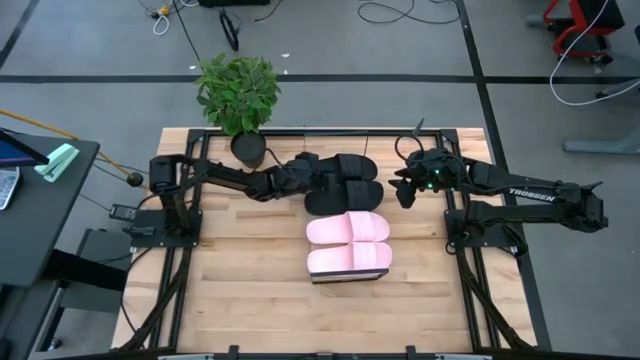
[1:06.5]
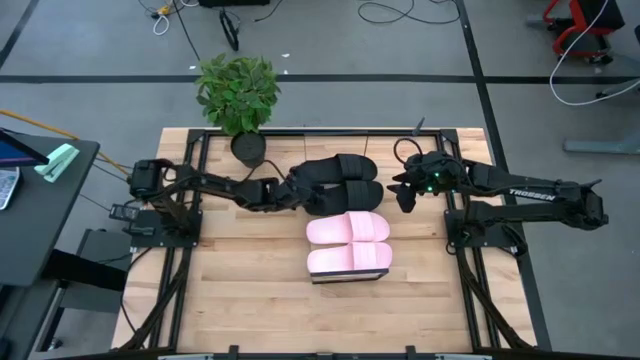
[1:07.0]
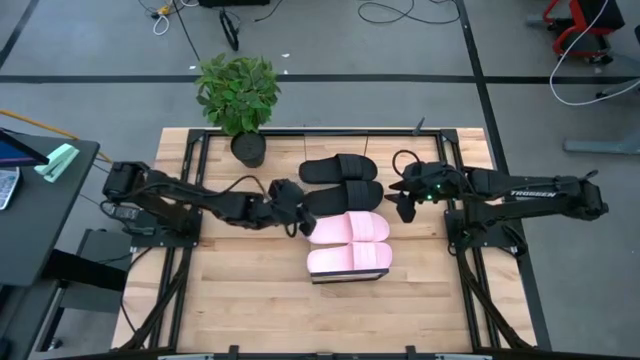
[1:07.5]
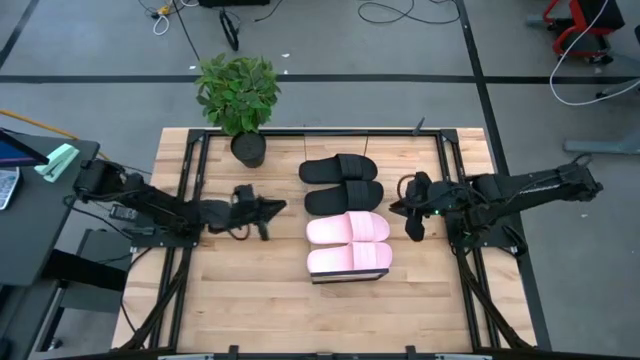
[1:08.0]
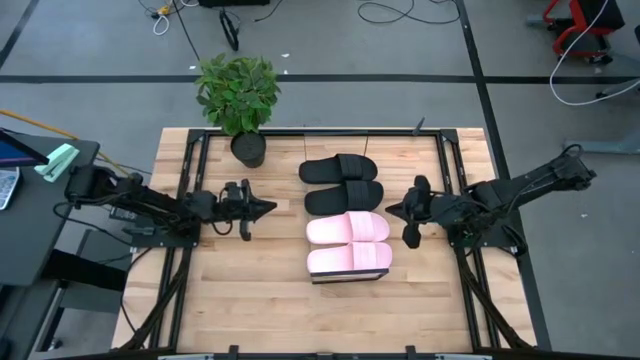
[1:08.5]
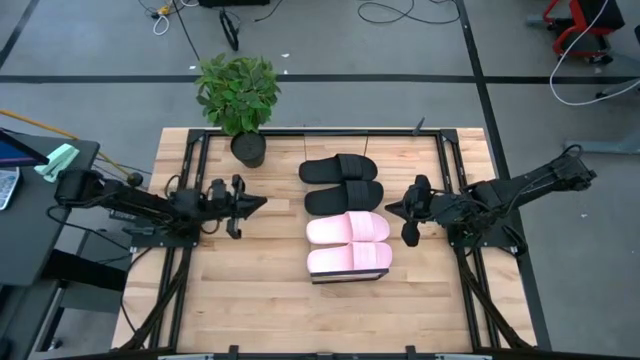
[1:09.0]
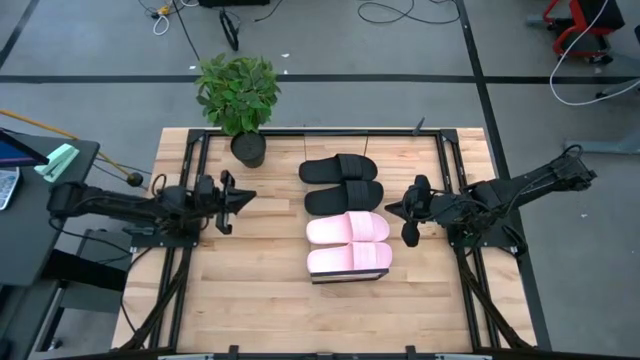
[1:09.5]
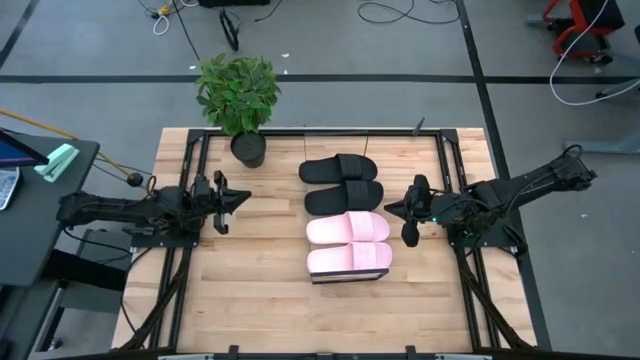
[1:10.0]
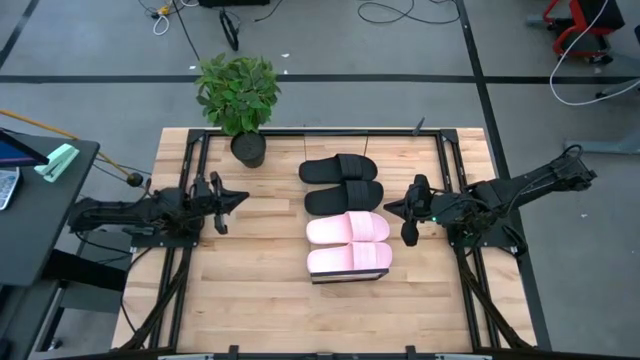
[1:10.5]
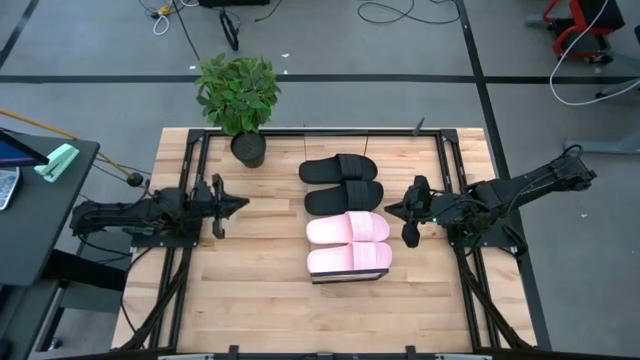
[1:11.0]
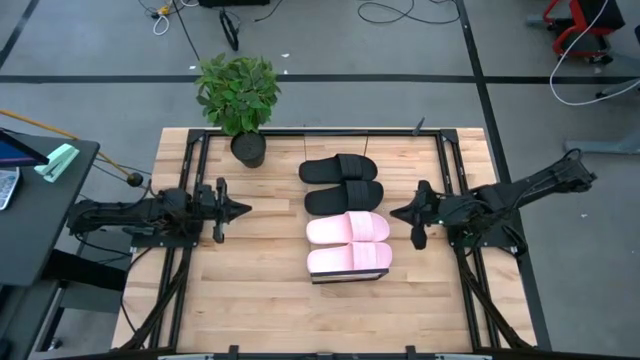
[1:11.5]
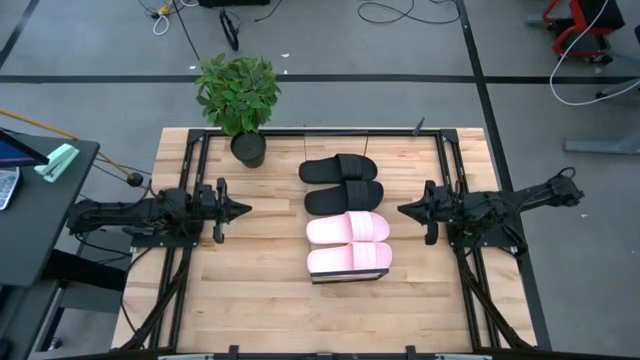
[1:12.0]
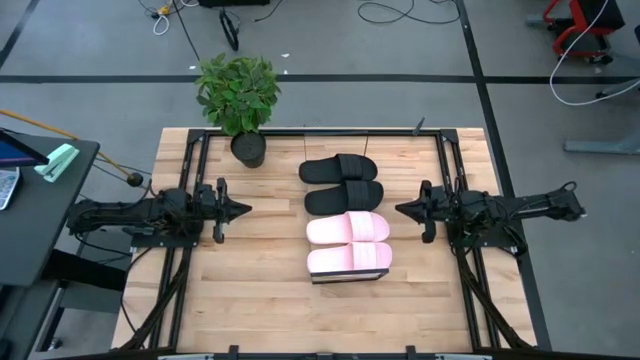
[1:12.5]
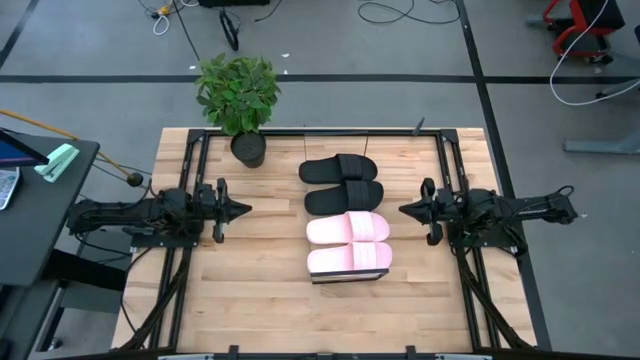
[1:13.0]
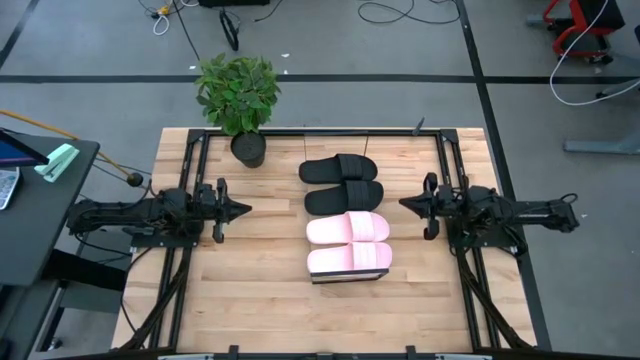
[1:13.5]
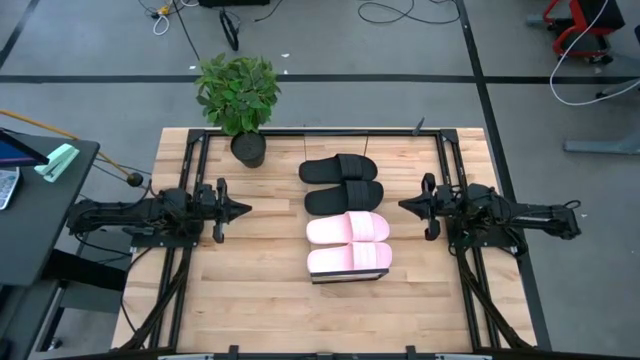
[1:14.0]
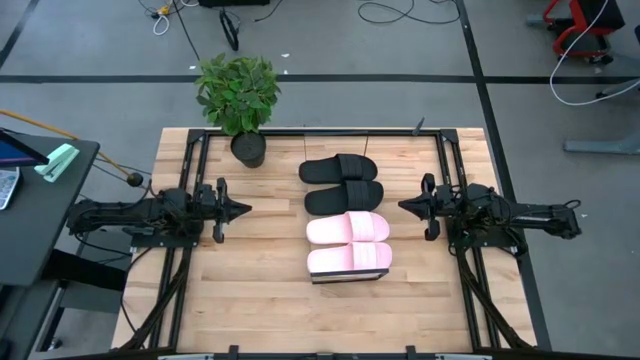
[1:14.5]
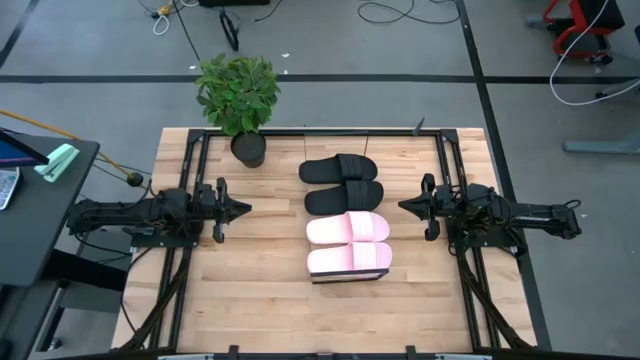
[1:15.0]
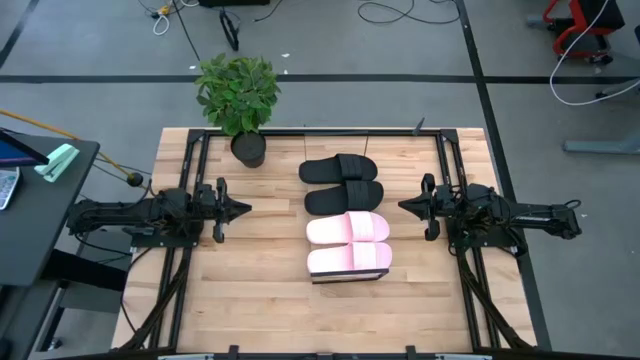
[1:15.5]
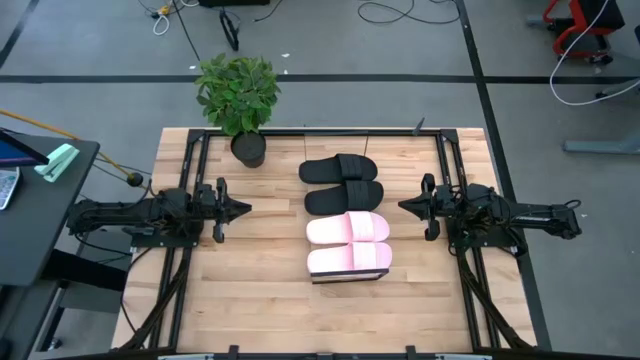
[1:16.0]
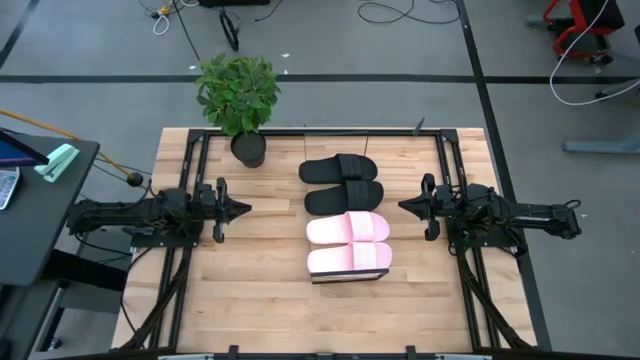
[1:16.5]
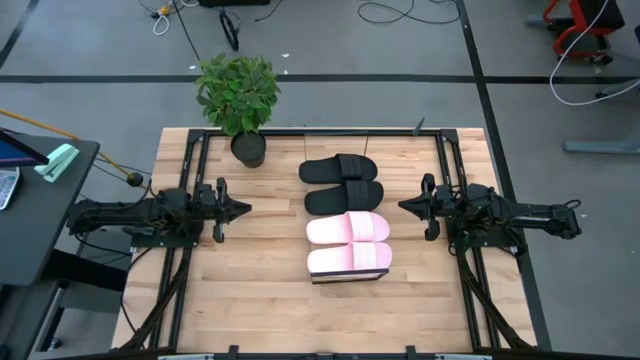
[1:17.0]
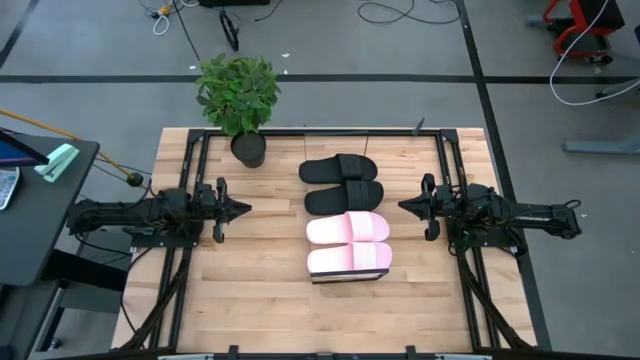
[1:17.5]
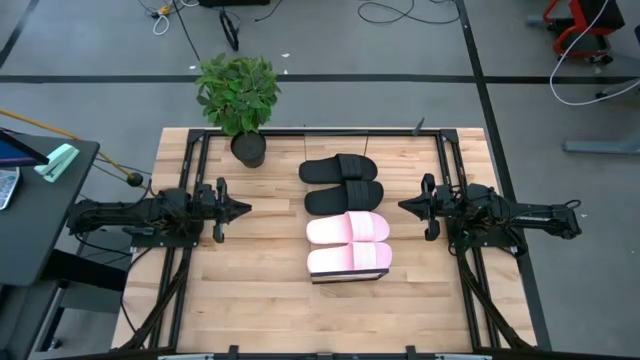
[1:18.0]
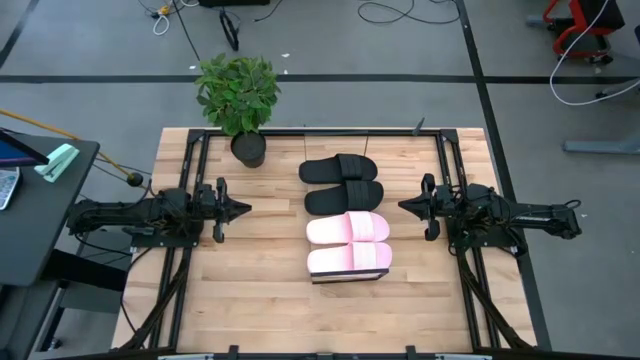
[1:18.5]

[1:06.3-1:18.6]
Task: Pick and place slides into the shelf
Return to Home Position

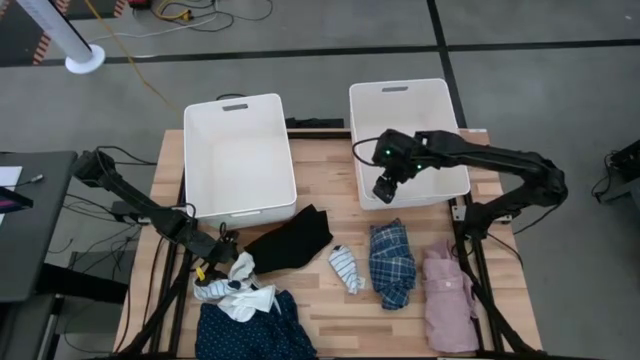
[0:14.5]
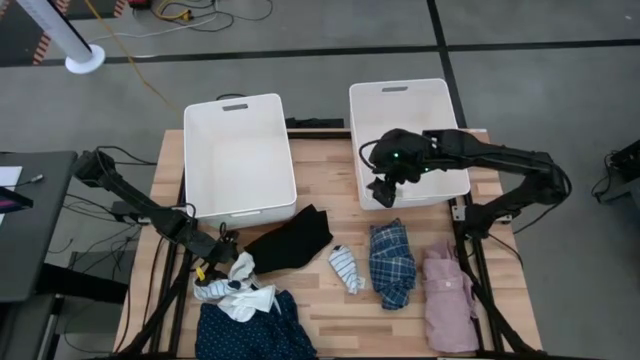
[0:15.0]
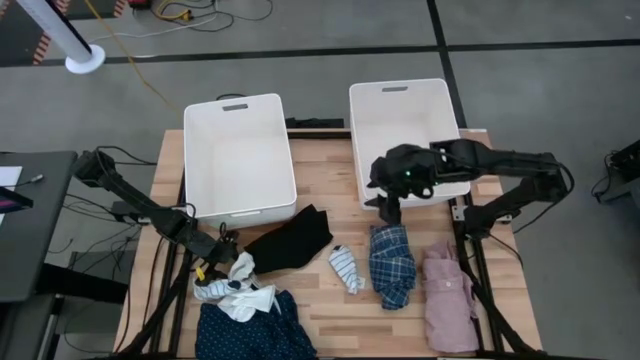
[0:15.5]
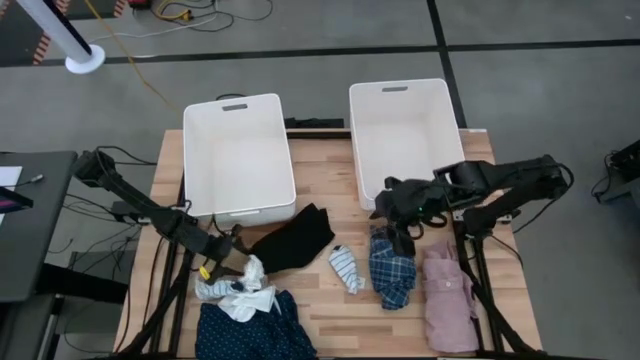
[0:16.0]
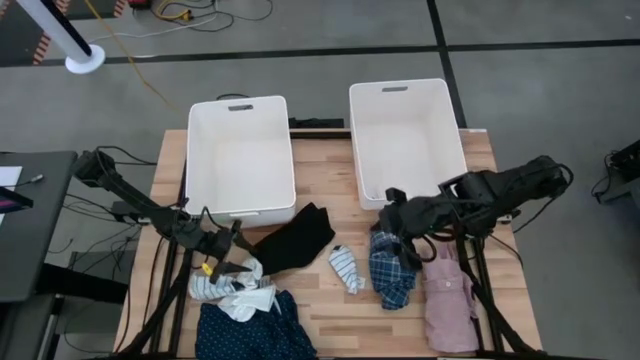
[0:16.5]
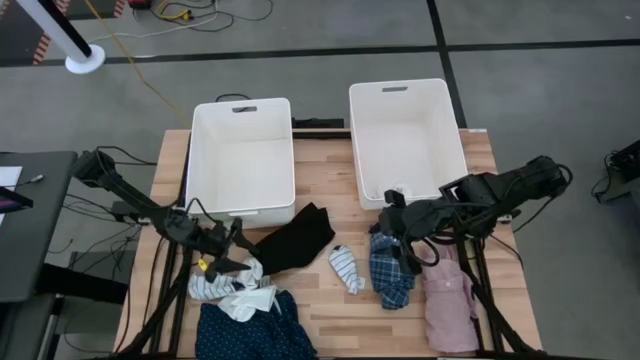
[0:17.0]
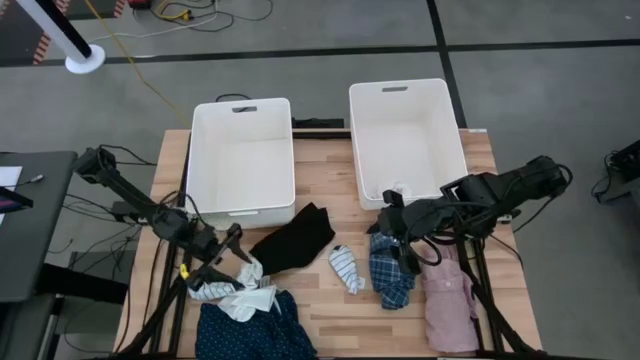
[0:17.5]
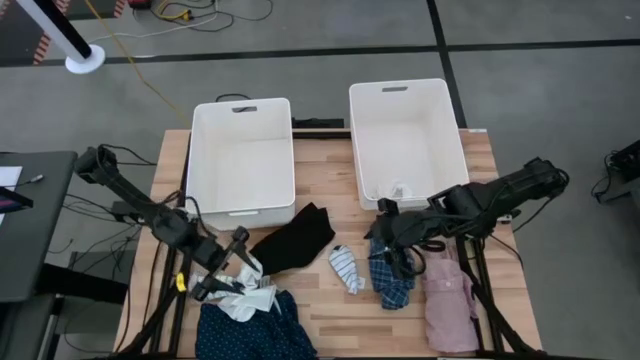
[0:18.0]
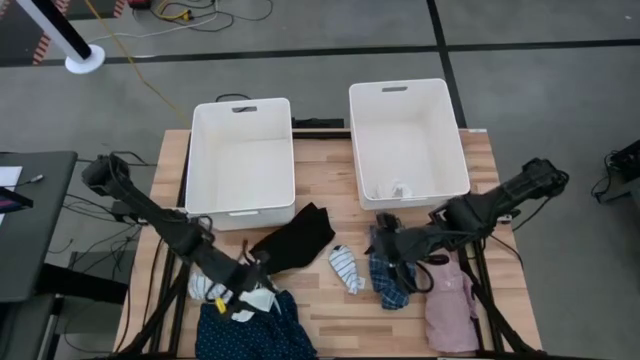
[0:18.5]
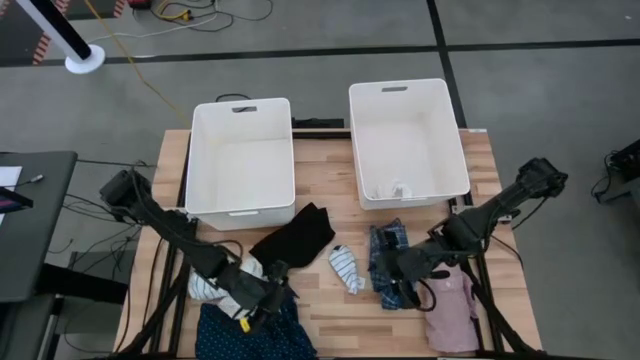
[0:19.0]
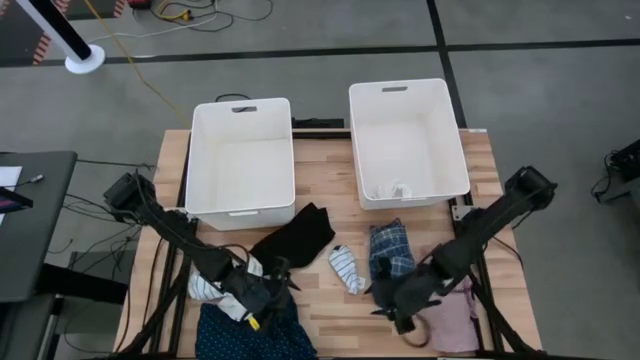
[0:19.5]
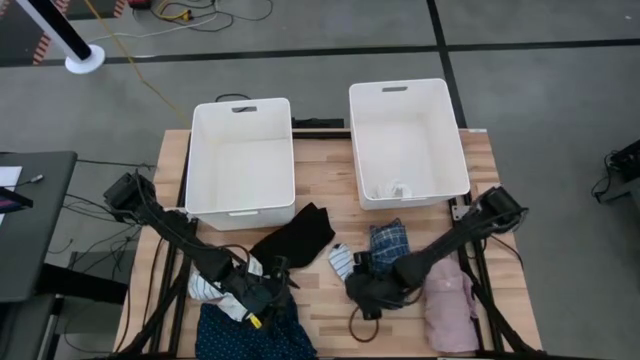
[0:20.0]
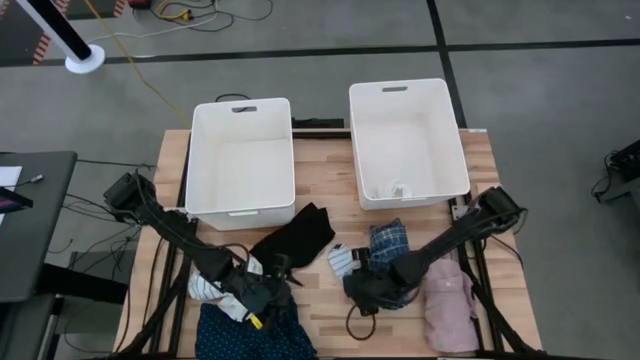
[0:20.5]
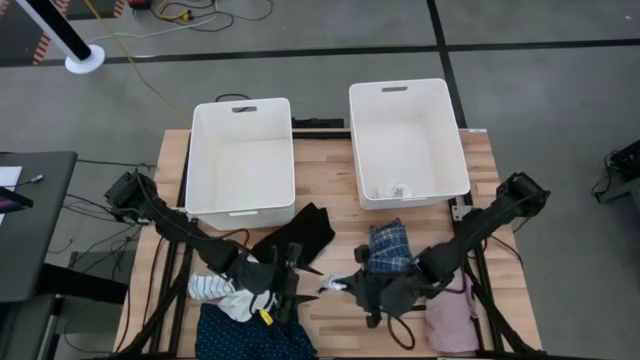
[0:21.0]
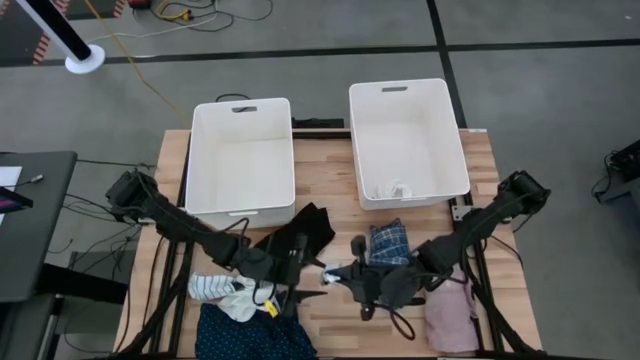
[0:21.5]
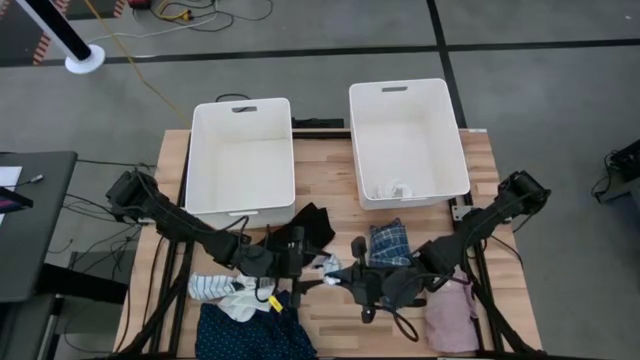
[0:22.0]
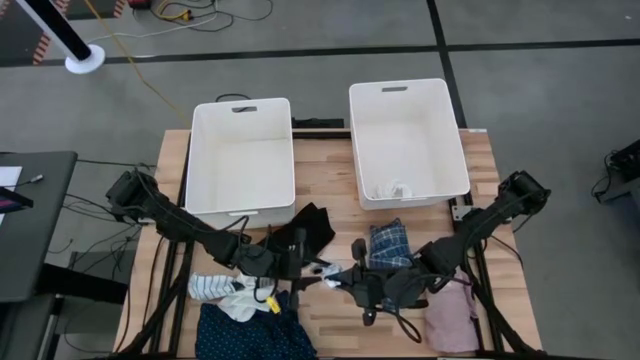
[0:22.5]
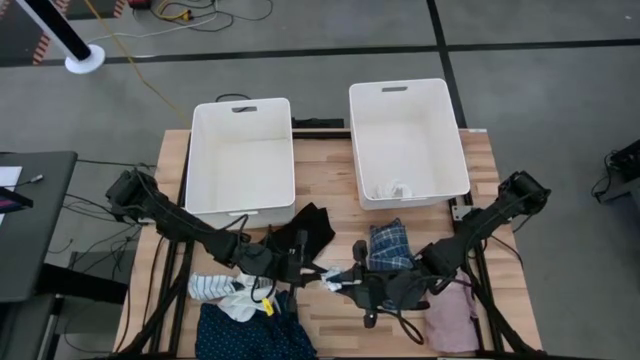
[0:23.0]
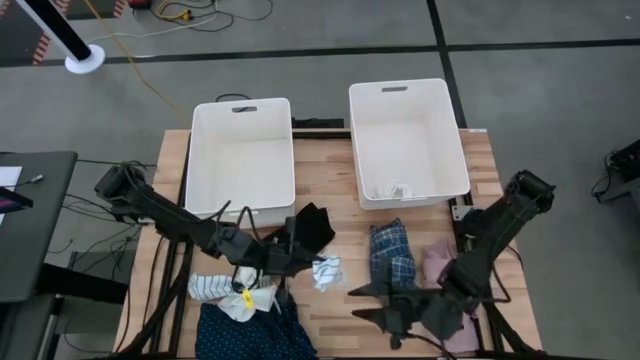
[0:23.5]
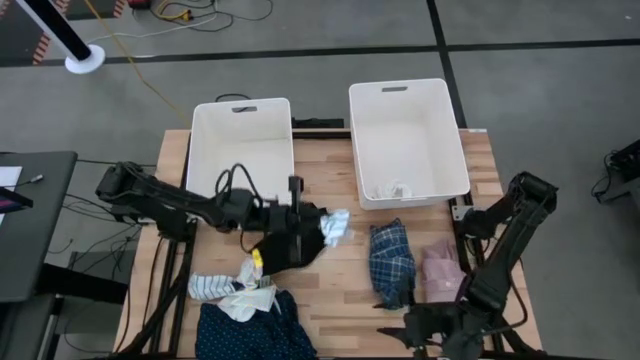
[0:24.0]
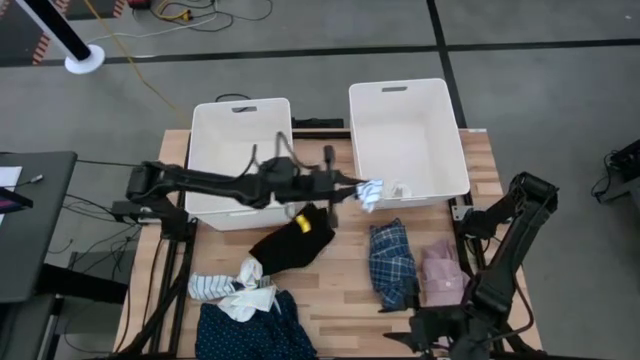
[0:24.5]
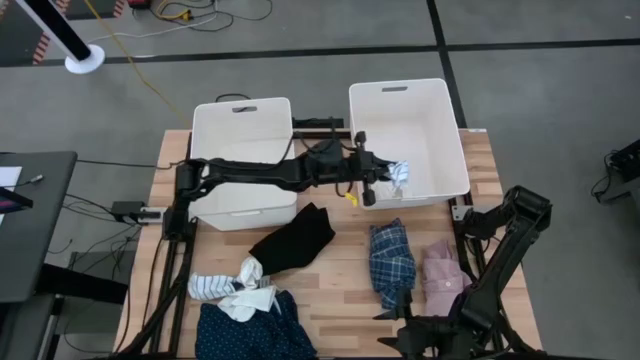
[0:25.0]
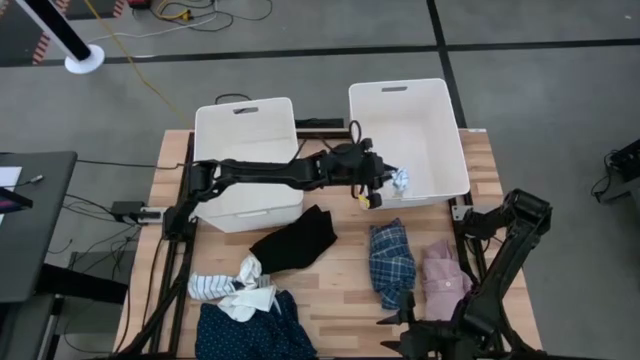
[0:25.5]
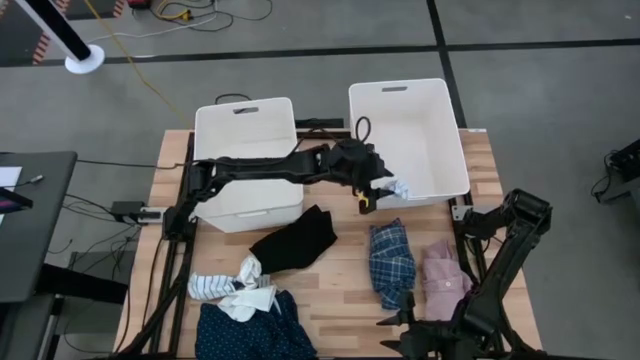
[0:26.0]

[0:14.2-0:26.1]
Task: Sort clothes
Put the right striped sock into the right bin
